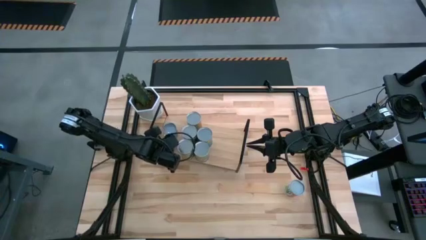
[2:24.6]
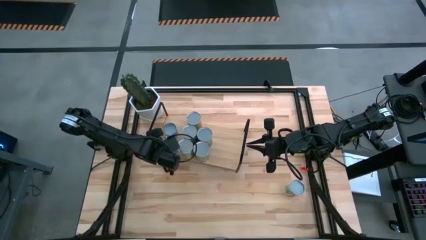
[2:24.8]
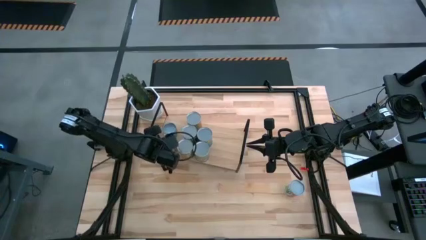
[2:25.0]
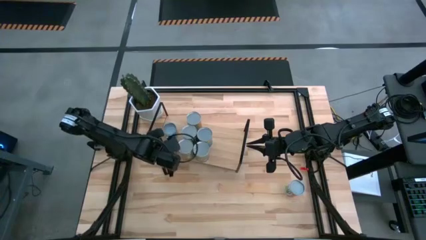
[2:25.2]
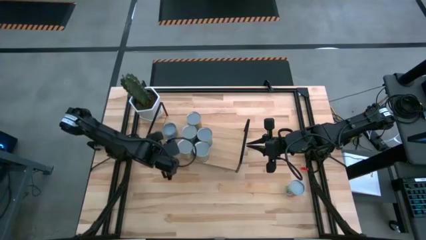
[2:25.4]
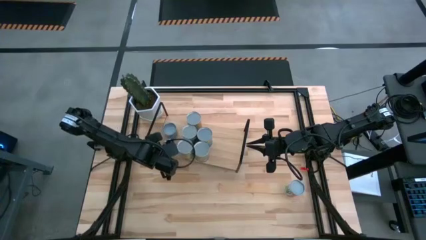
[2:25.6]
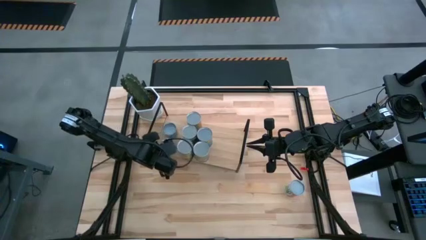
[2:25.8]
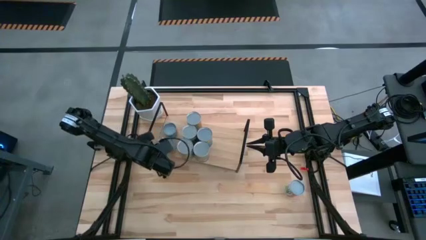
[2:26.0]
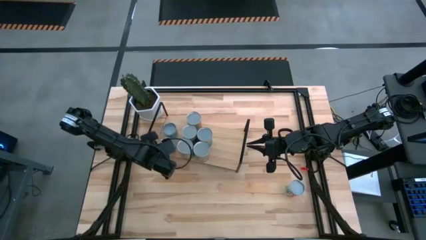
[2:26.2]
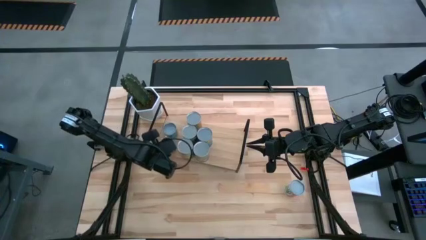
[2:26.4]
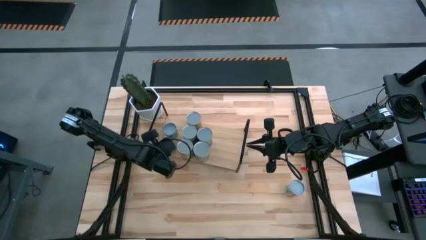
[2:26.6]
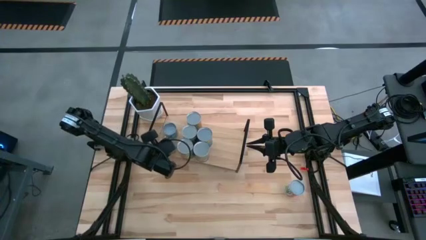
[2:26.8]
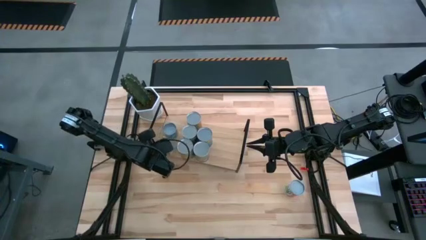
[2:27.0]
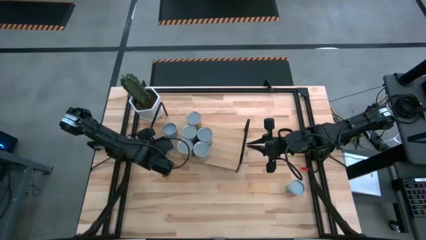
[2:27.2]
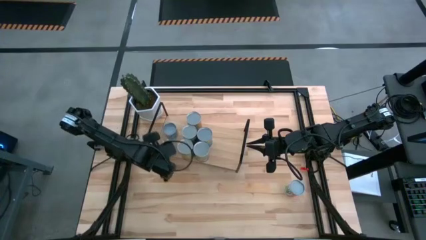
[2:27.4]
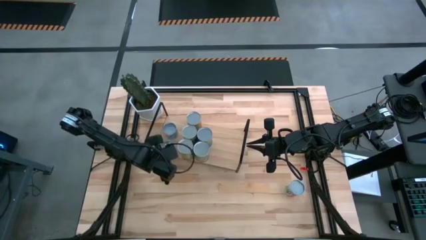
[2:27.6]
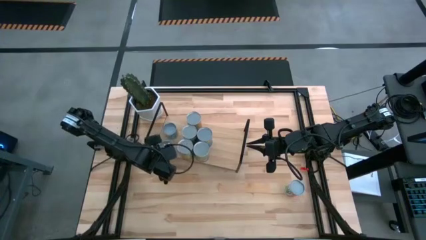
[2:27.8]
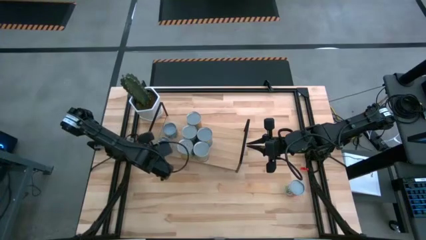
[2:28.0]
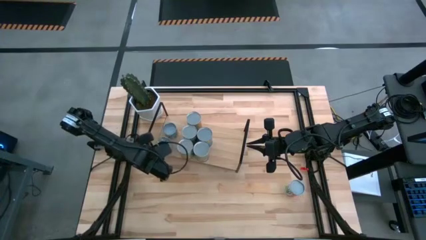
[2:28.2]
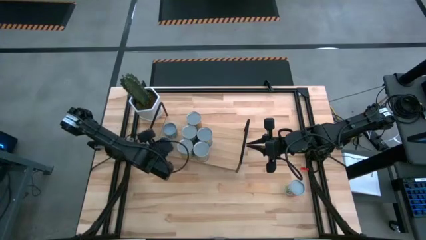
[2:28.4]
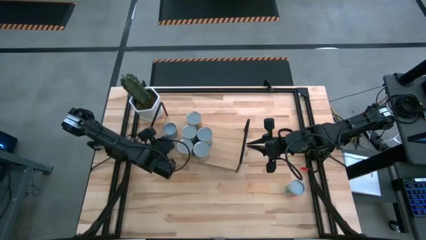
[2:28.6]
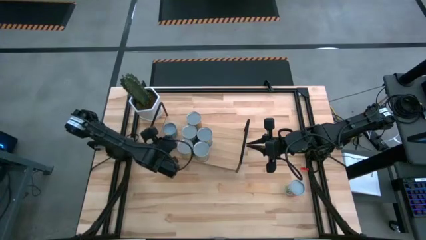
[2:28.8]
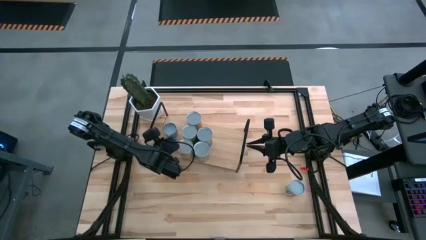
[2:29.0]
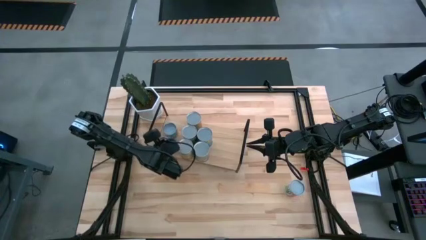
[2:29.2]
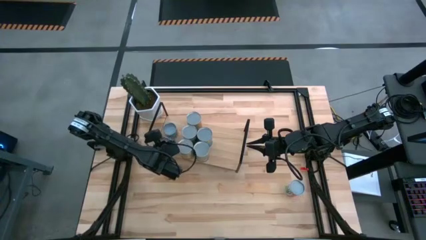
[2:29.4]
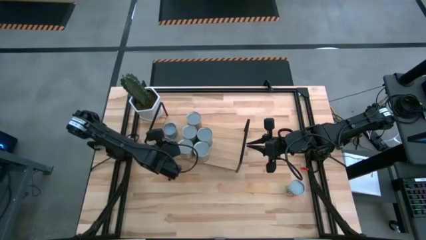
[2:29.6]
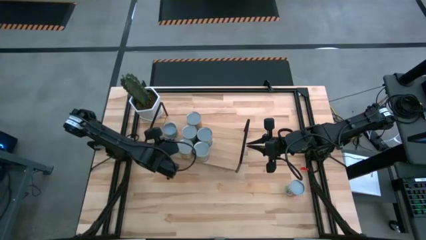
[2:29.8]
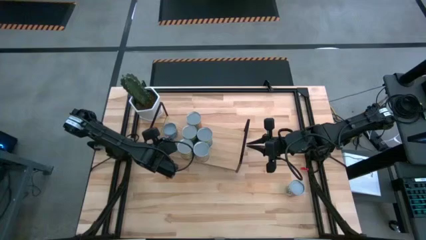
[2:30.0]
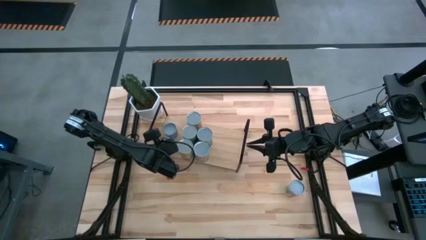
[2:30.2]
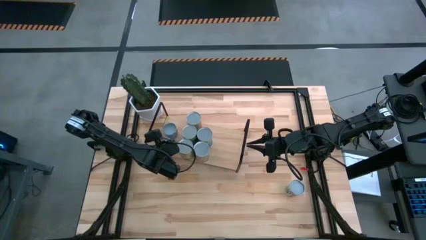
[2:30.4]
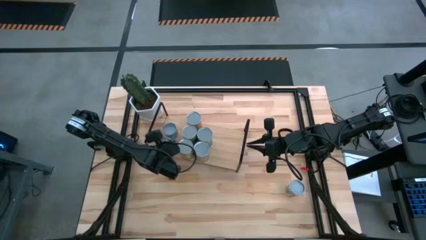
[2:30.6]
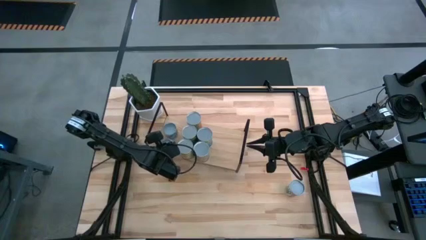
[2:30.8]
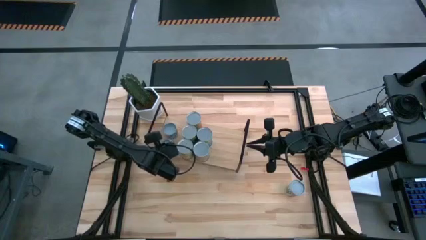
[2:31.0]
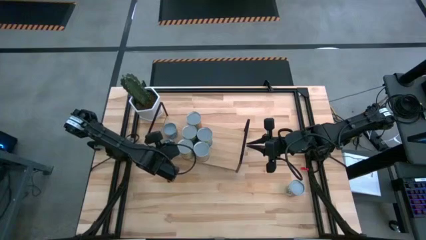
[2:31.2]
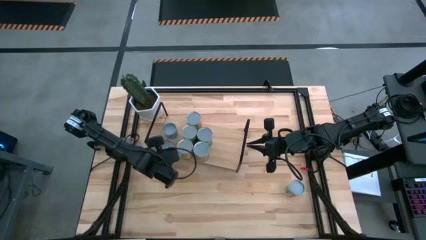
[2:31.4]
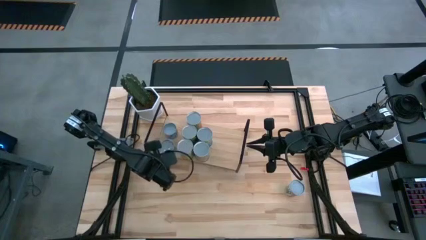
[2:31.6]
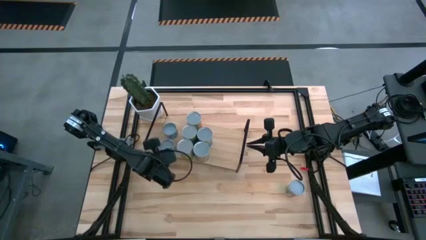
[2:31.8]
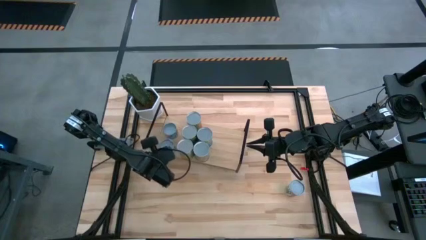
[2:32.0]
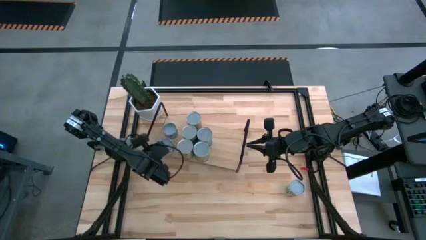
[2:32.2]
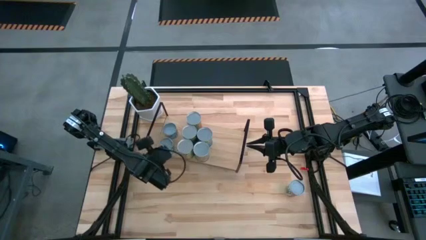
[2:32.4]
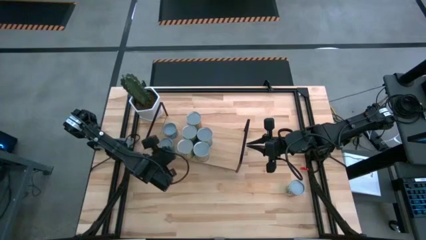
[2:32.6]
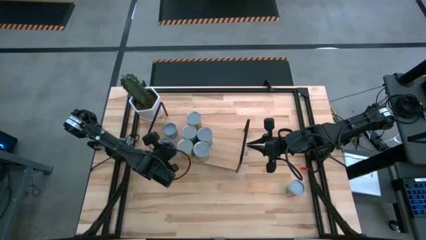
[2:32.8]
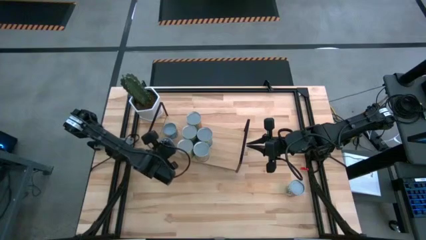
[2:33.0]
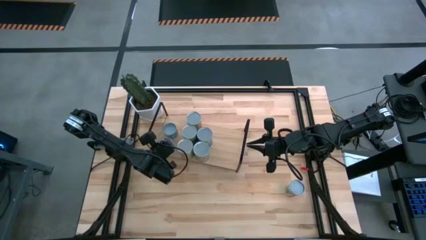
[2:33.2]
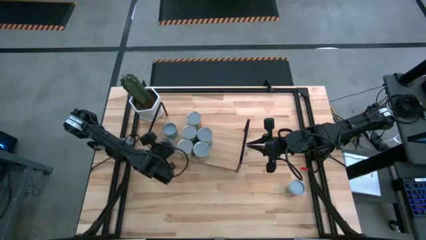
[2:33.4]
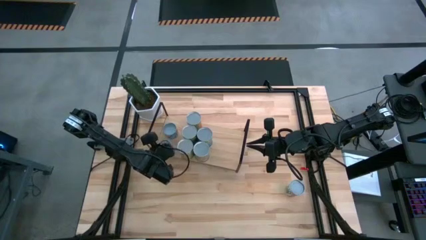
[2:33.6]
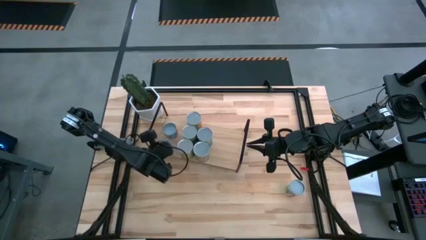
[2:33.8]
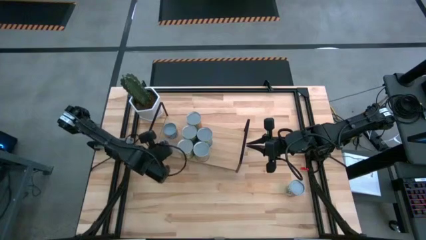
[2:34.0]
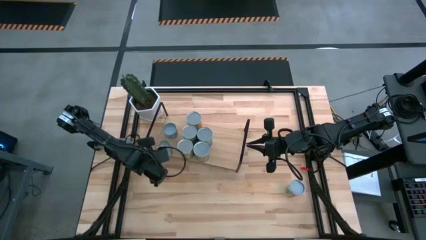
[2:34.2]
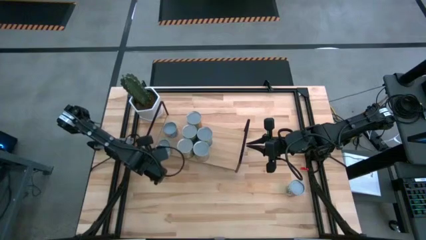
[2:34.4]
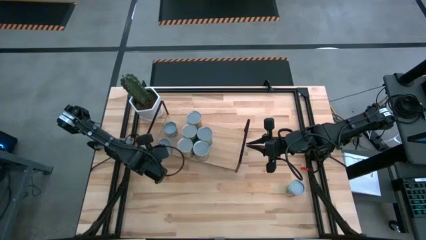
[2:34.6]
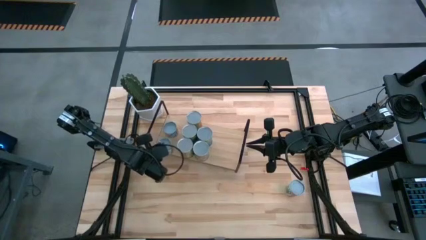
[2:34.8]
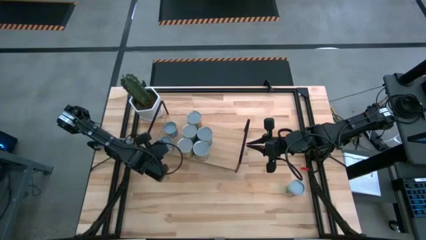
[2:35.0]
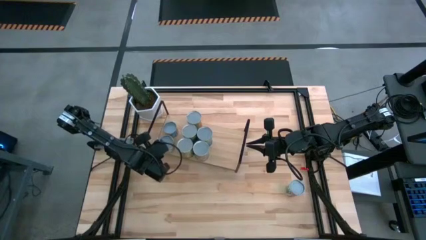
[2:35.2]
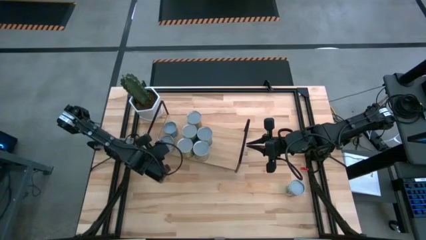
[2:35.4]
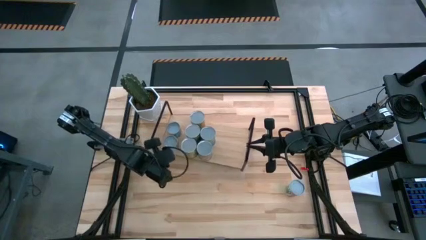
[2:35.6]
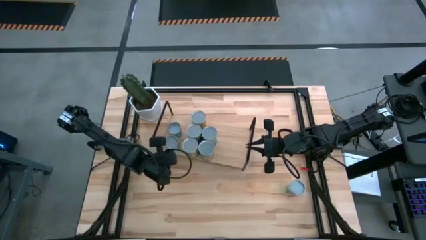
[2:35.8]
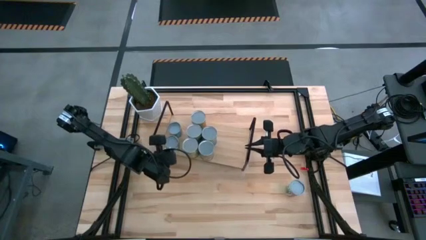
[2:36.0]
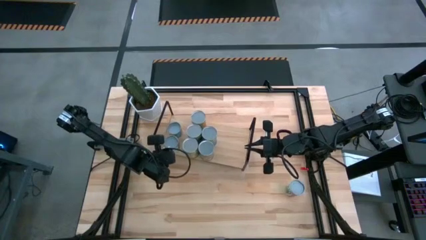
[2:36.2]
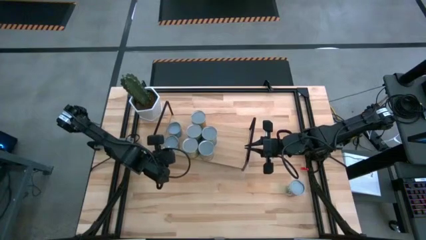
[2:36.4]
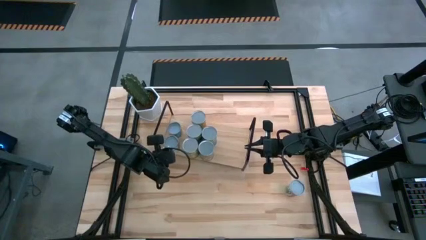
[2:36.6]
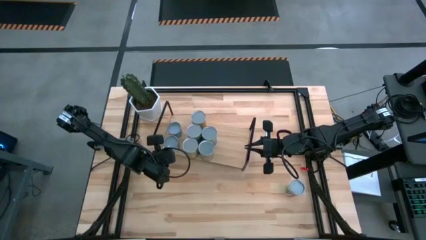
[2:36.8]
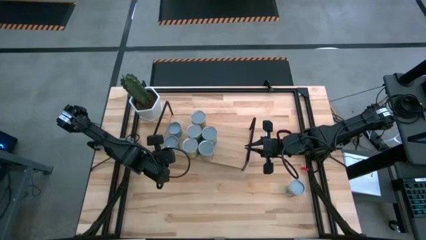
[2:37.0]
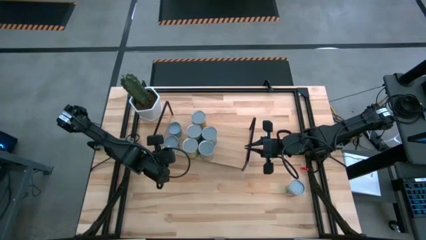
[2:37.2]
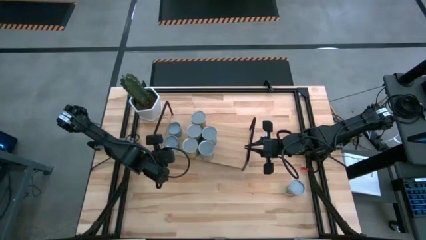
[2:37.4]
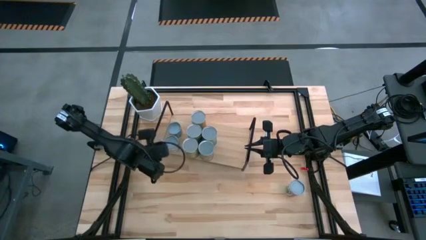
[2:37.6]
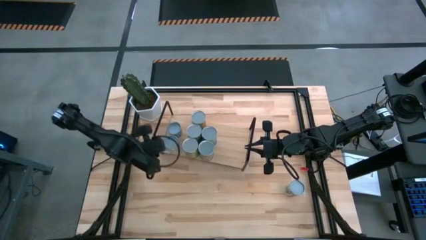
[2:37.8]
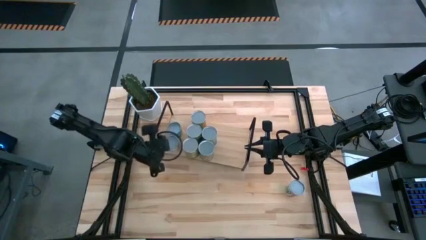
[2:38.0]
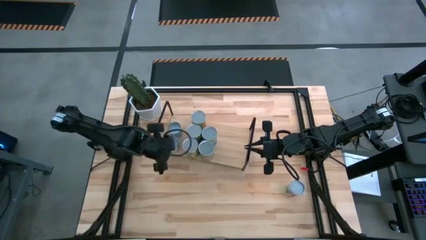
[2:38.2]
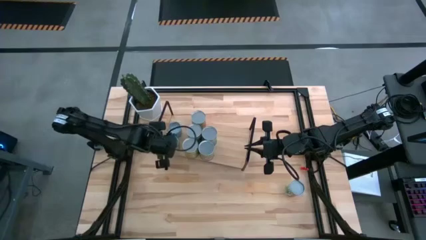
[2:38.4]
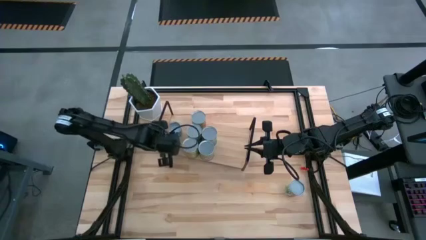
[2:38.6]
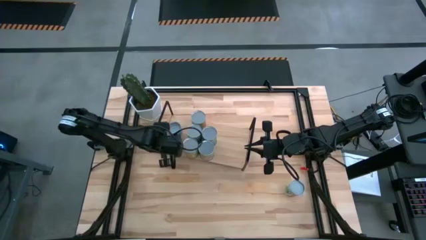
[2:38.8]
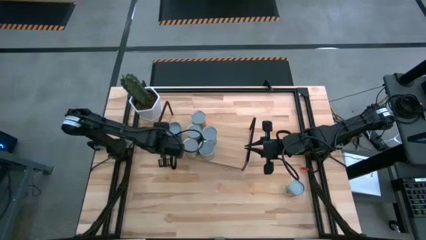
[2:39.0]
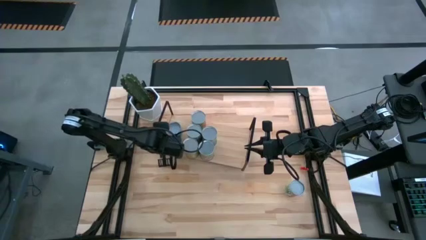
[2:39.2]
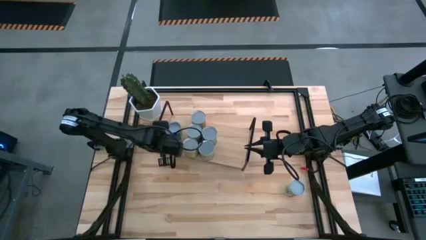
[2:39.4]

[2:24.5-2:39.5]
Task: Pick and place cans onto a shelf
Adjust the small canned oranges can on the shelf

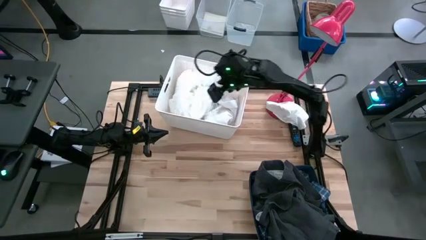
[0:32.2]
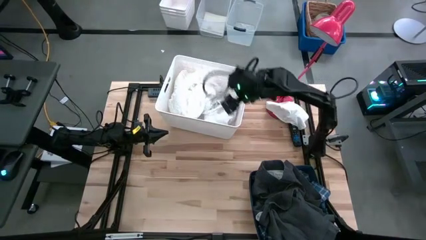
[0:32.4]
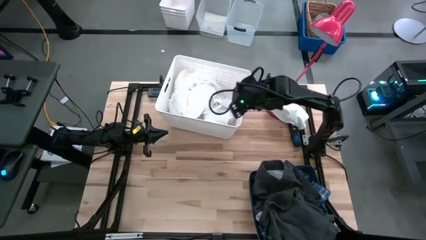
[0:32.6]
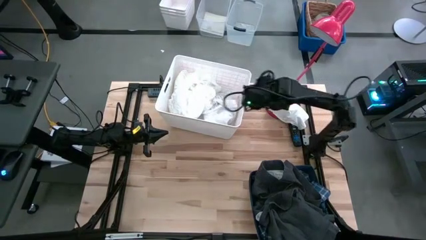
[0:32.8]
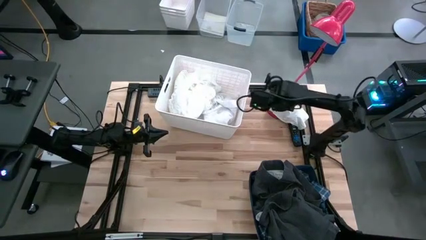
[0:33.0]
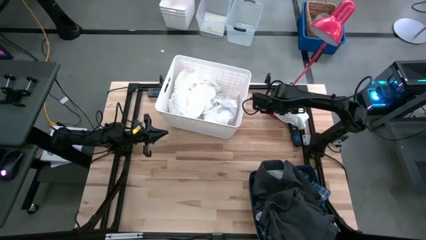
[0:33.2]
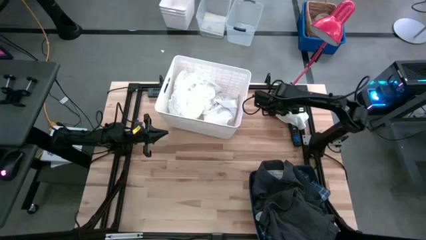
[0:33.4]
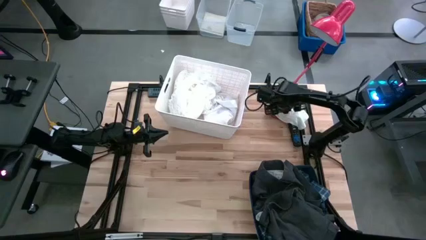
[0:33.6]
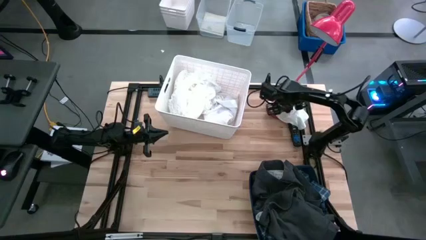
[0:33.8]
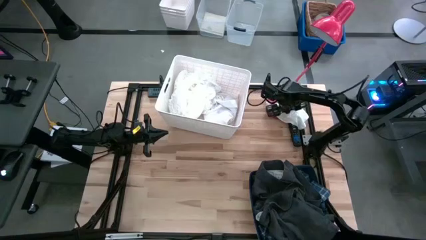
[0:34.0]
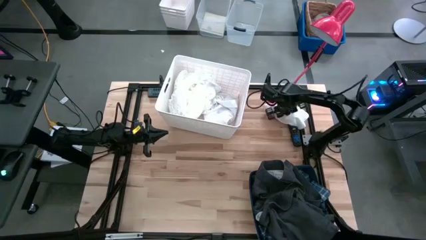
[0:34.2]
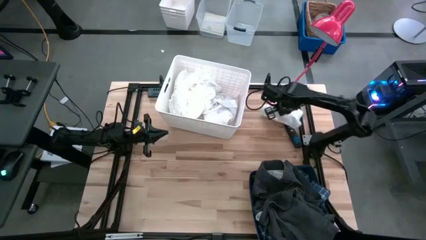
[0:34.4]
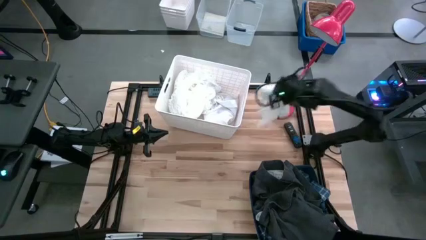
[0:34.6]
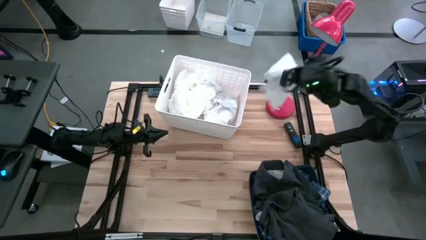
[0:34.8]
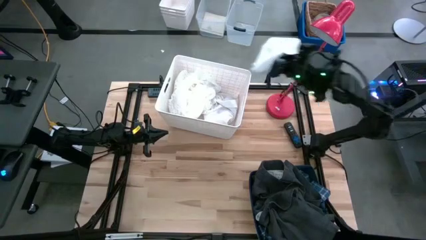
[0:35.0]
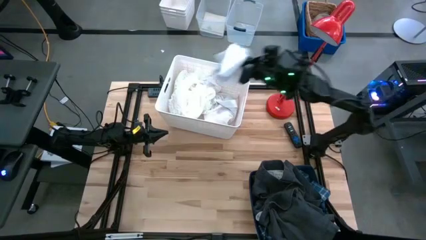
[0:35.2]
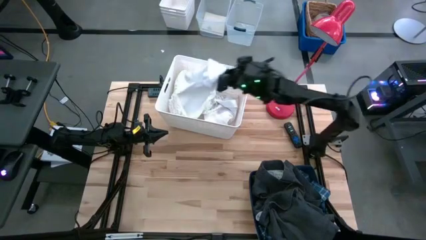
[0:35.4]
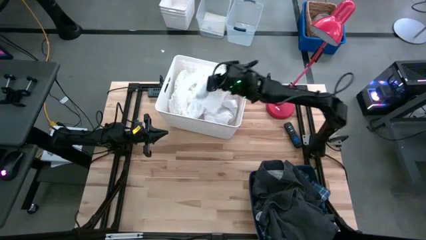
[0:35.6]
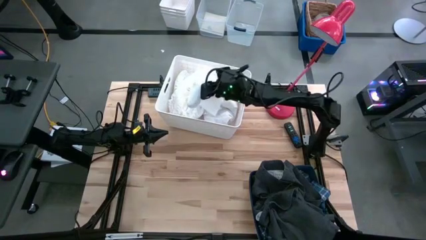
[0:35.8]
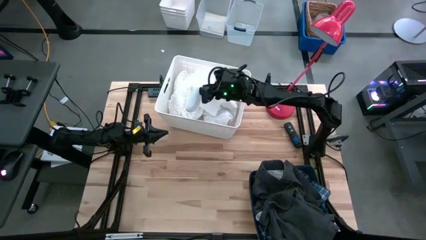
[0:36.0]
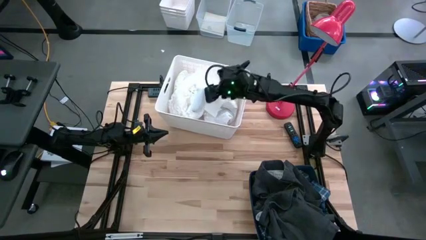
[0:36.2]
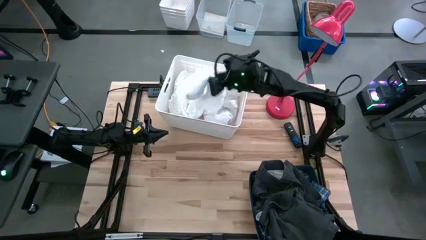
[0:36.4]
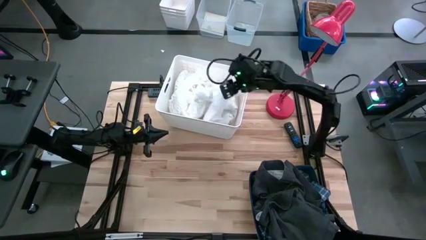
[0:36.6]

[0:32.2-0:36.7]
Task: Sort clothes
Put the white towel into the white laundry bin
